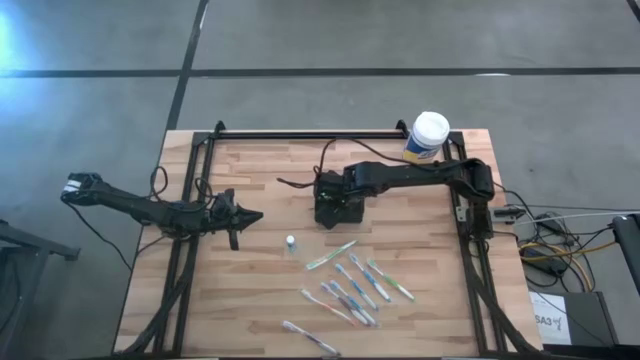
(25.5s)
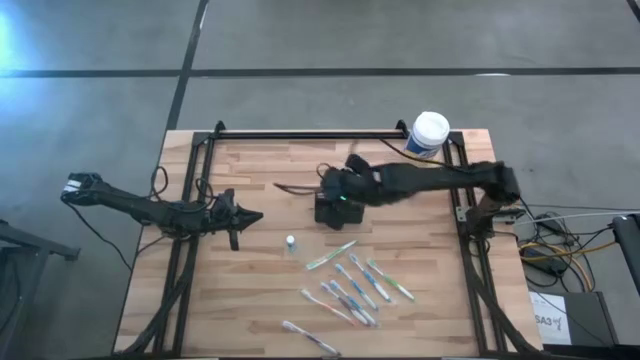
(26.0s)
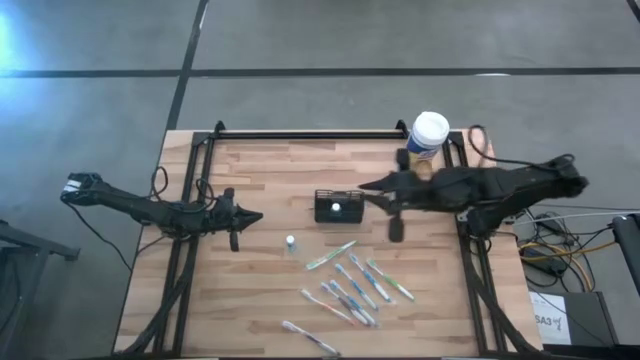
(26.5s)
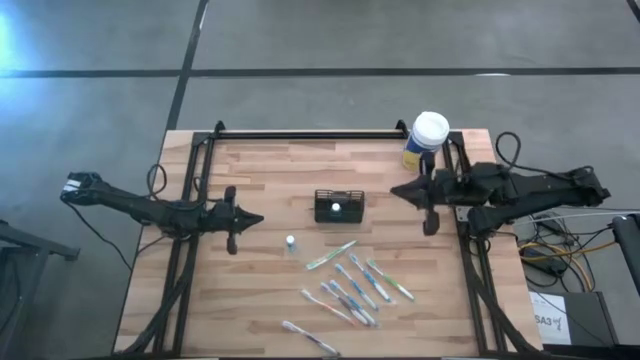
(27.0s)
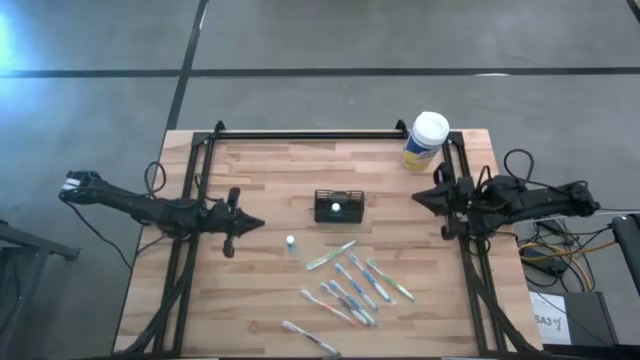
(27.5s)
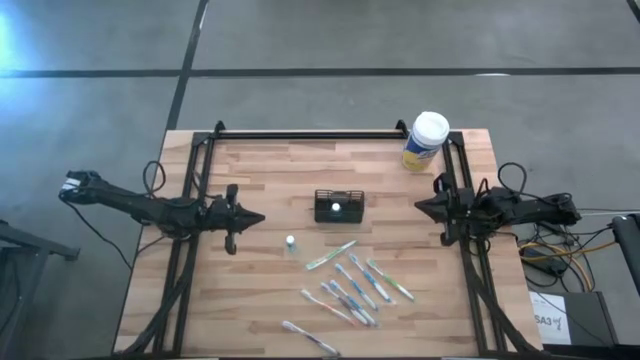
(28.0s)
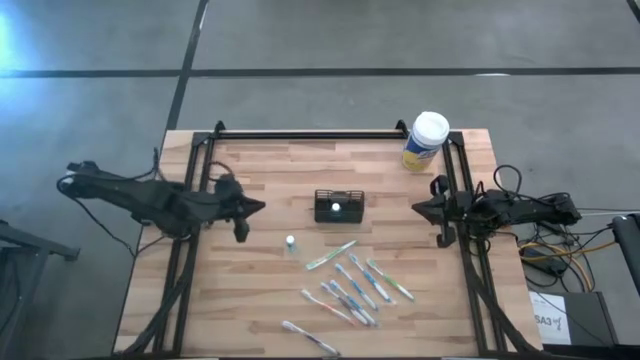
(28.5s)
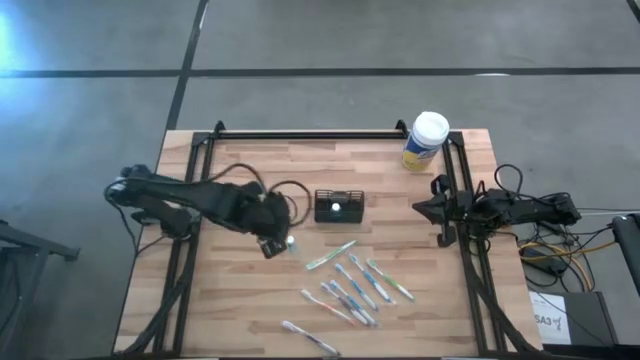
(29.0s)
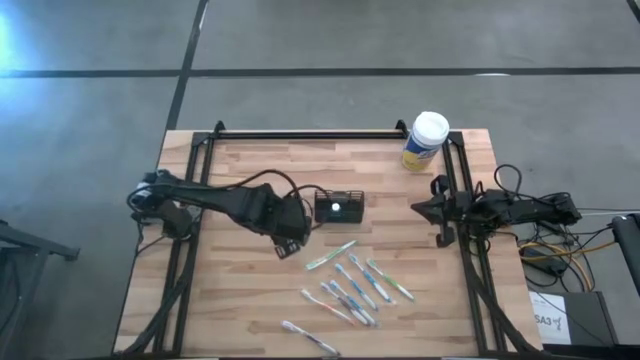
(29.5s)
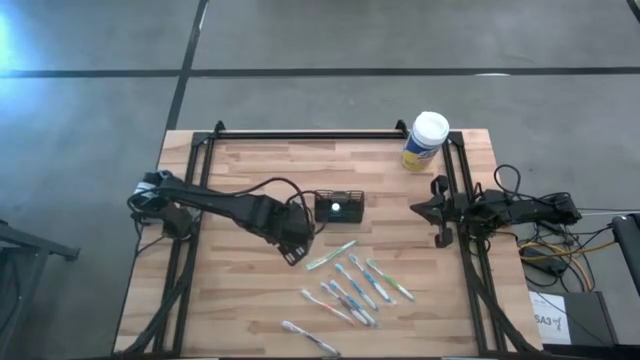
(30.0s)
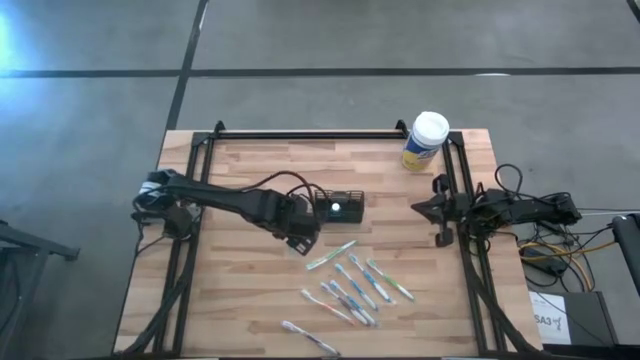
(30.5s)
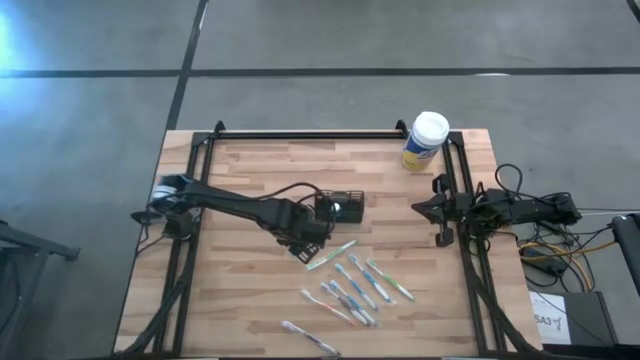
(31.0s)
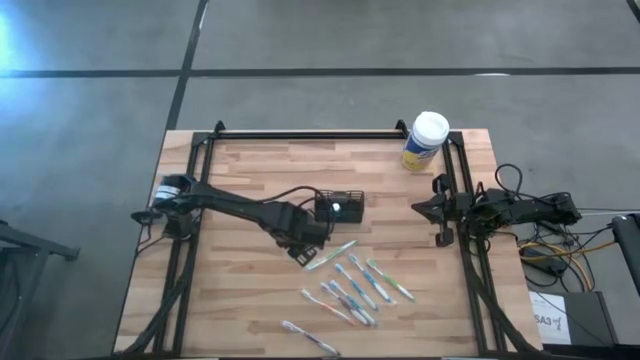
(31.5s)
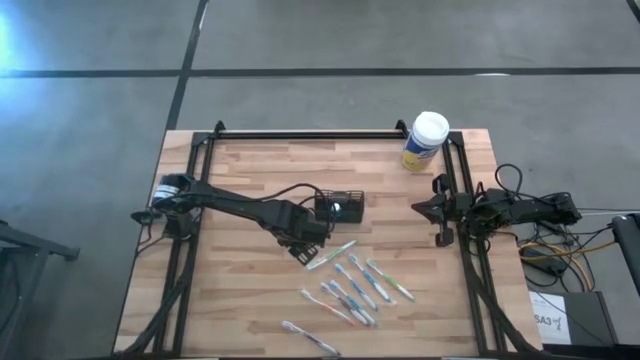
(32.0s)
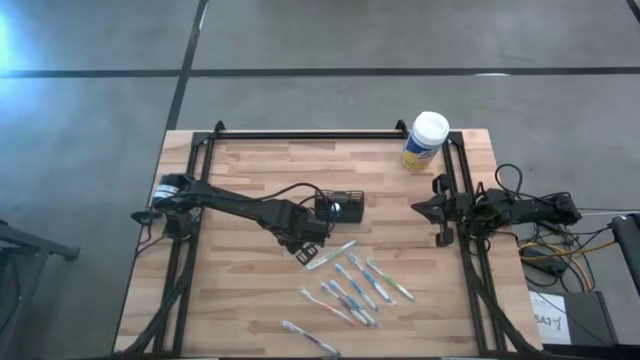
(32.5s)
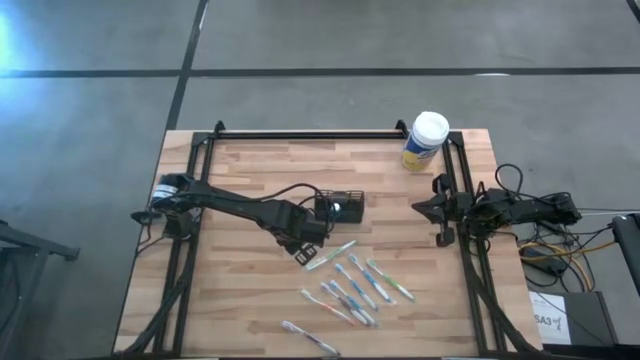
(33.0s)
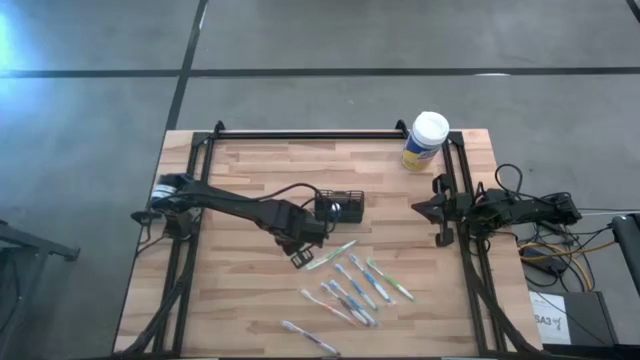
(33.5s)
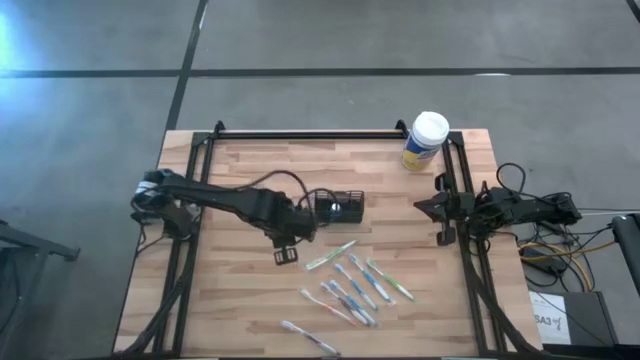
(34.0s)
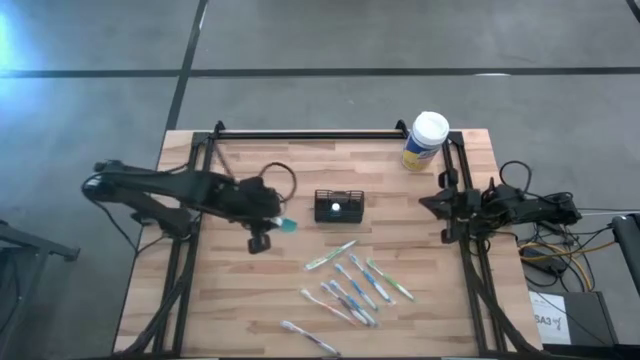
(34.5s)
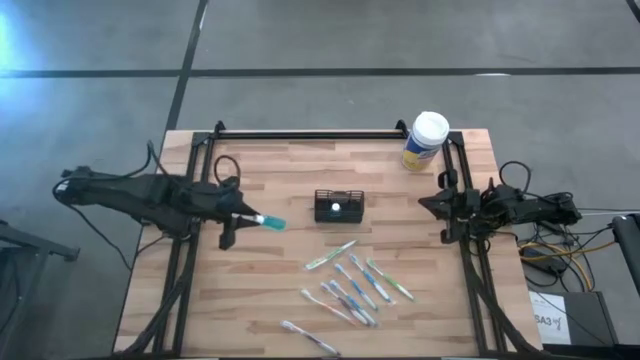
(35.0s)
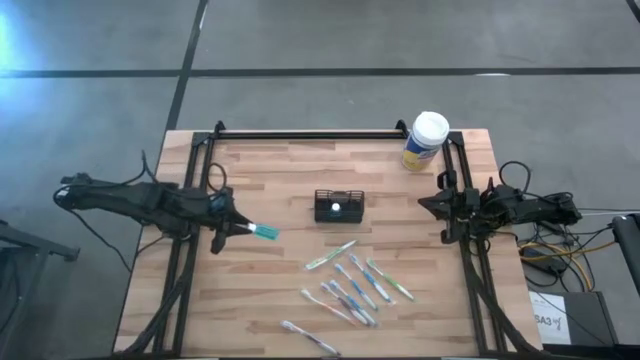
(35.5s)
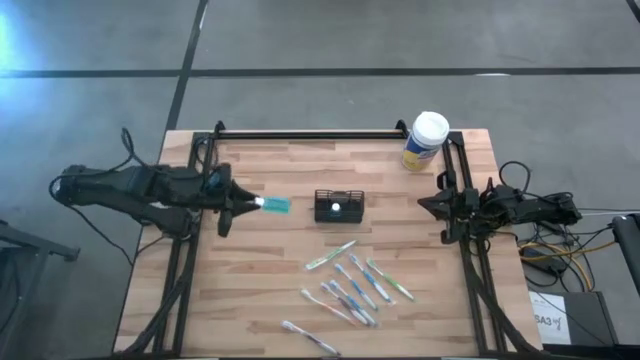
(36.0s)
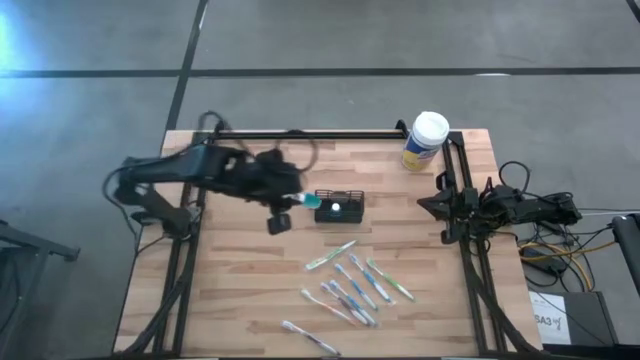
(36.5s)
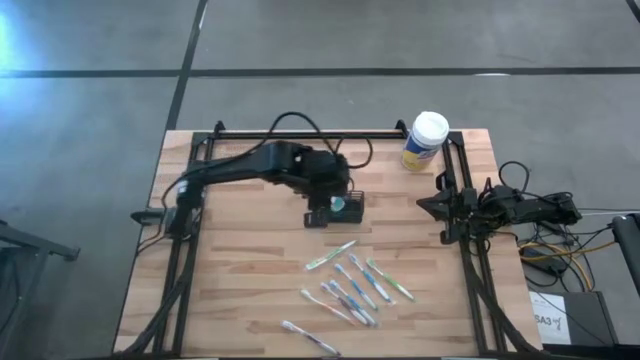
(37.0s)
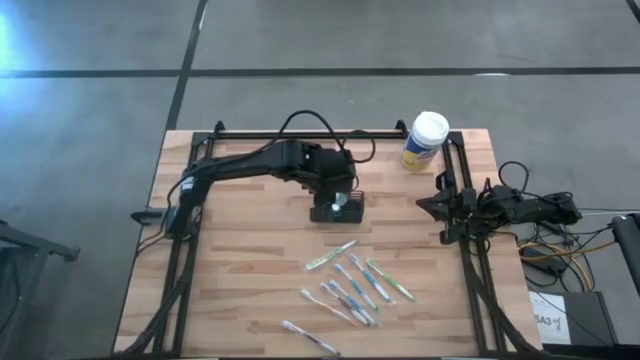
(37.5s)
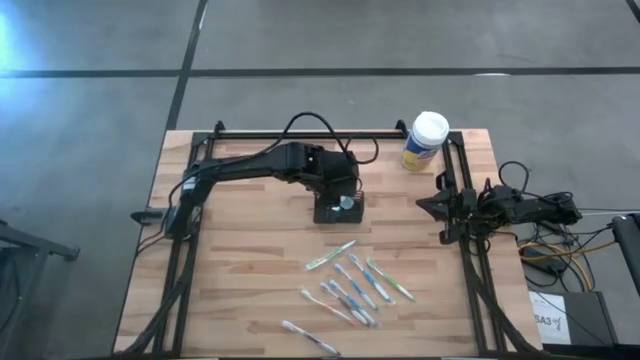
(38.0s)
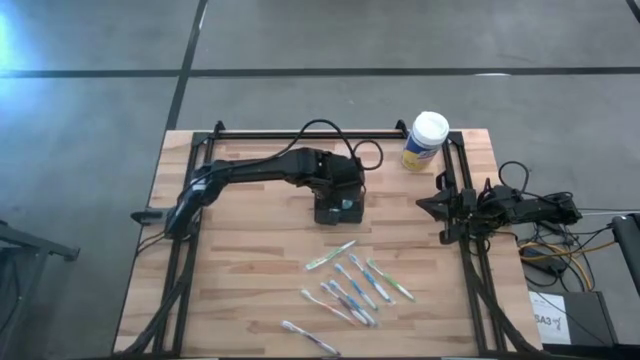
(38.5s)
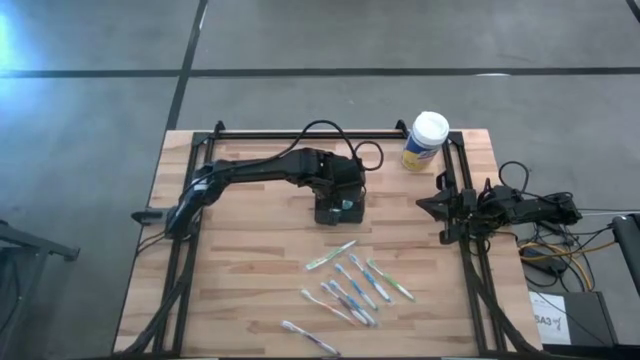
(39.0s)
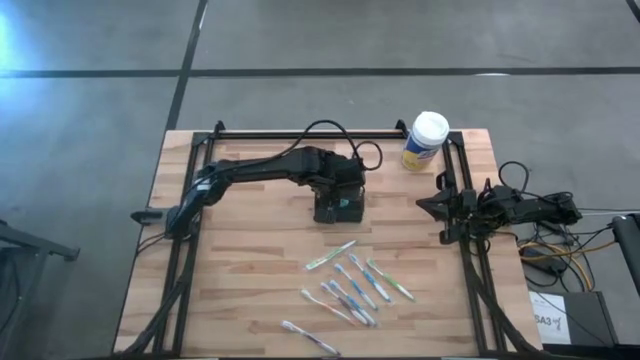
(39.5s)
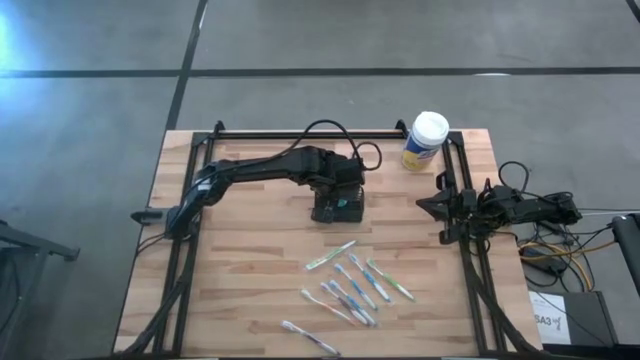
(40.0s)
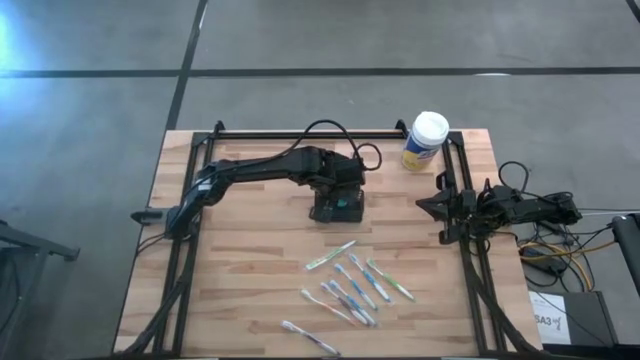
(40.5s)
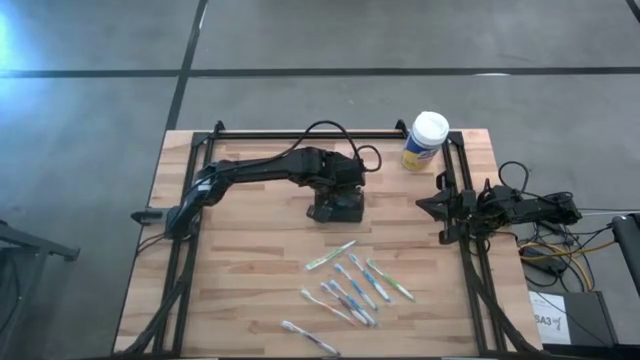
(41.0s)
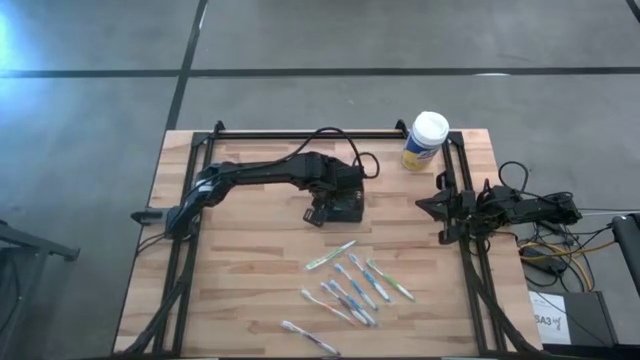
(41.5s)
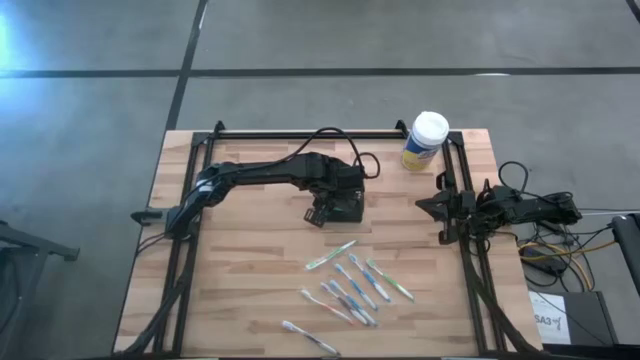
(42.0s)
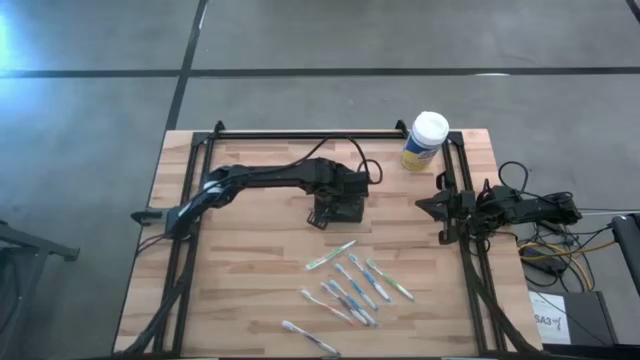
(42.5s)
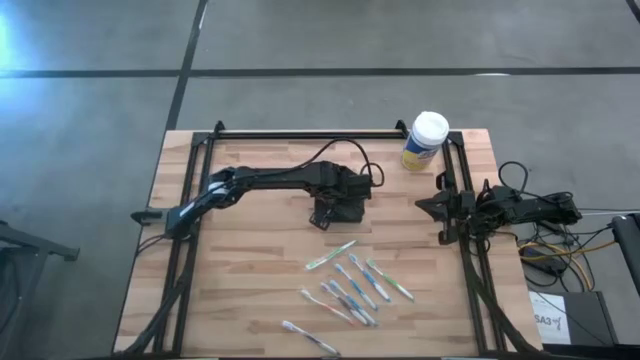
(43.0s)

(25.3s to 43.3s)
Task: Pick & Place toothbrushing station
Put the blue mouthwash into the black wire organizer

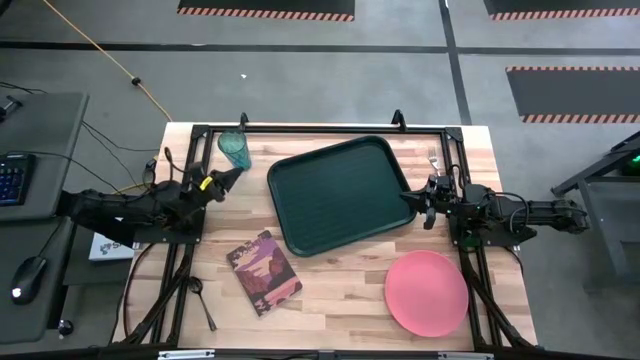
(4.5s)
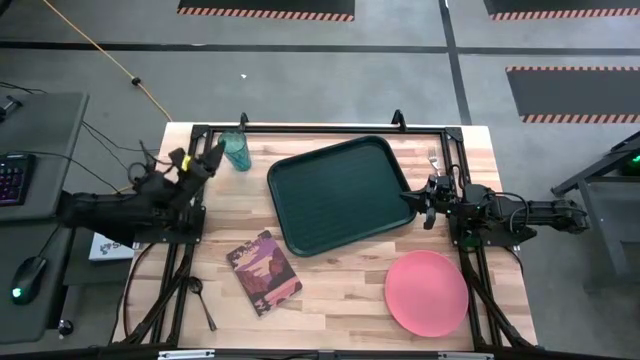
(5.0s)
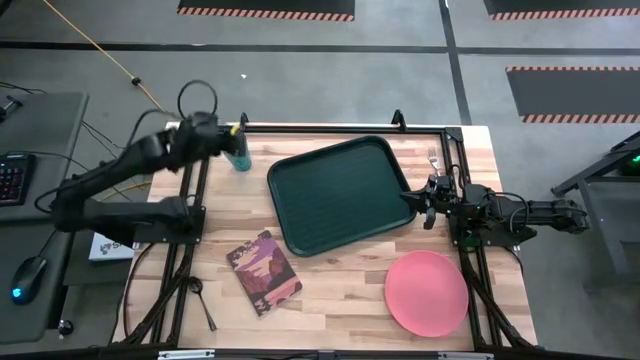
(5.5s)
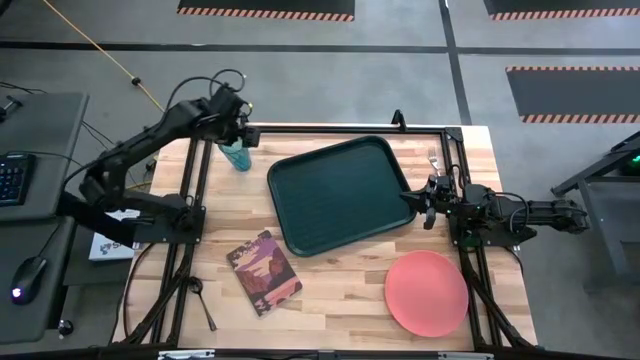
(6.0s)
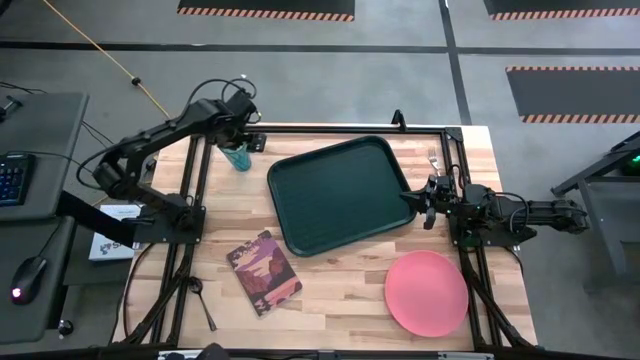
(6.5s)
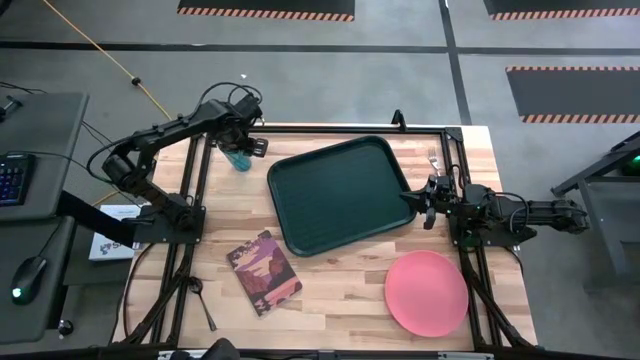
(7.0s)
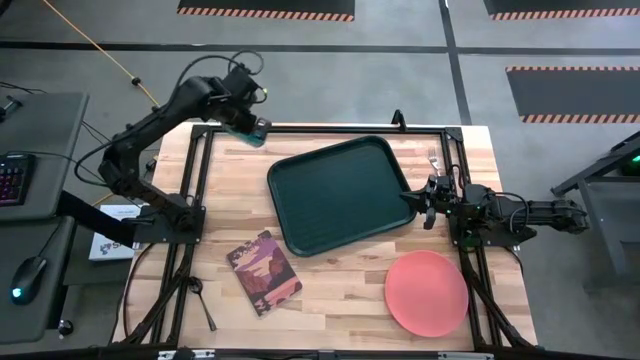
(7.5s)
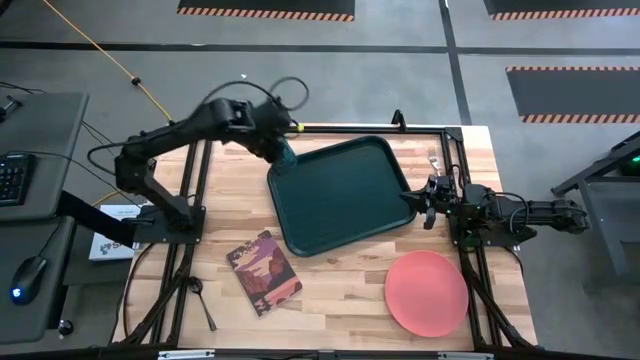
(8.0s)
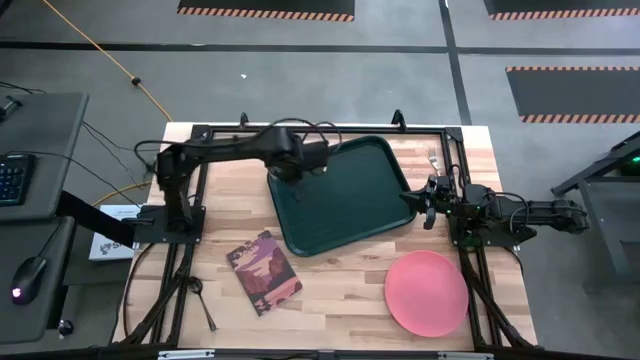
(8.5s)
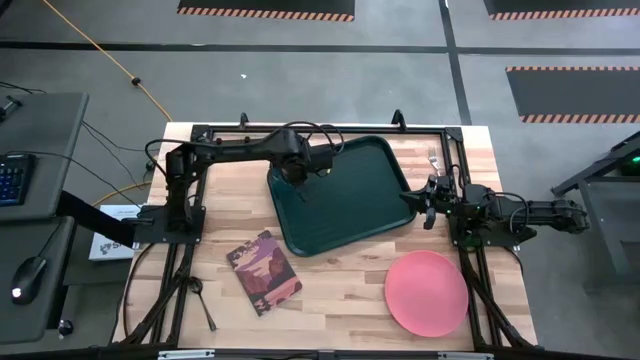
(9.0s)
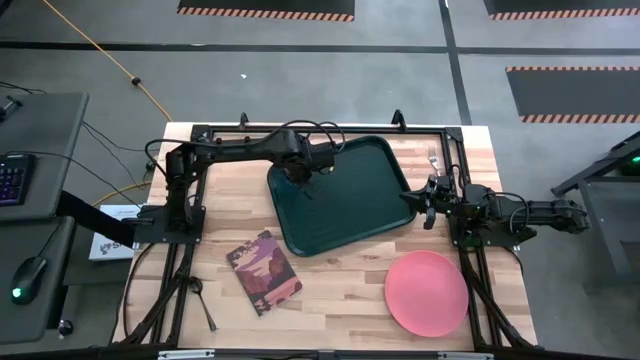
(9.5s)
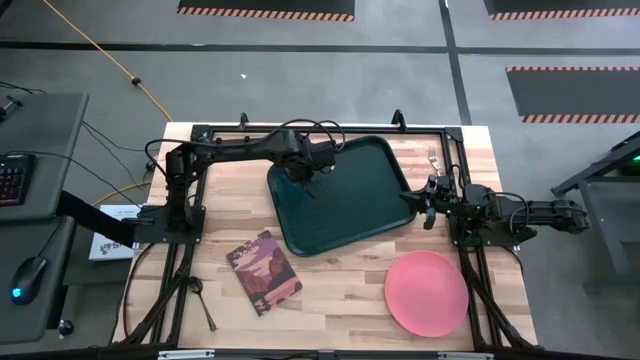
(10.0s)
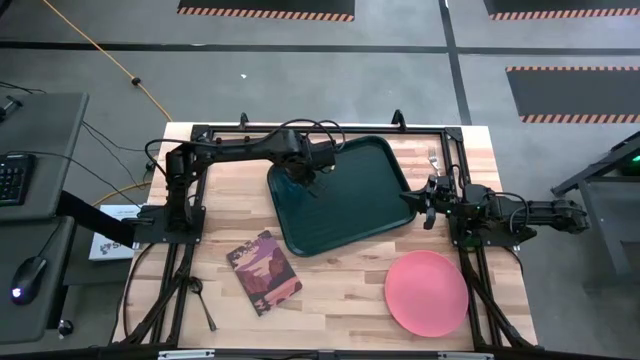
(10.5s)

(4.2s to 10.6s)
Task: Pick and place plate/cup/fork/spoon on tray
Put the blue cup on the black tray
